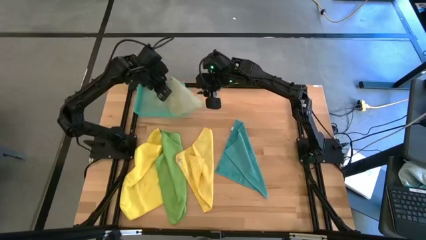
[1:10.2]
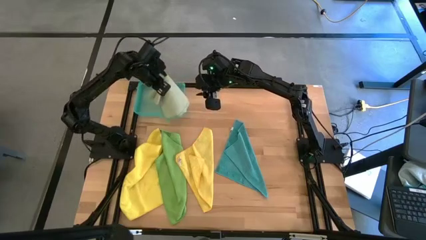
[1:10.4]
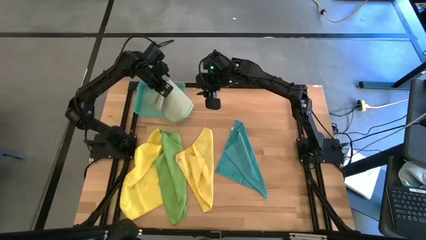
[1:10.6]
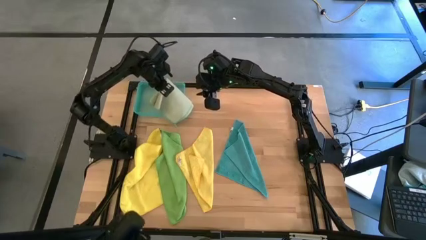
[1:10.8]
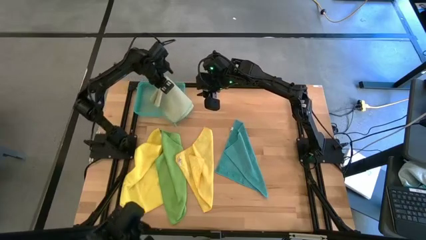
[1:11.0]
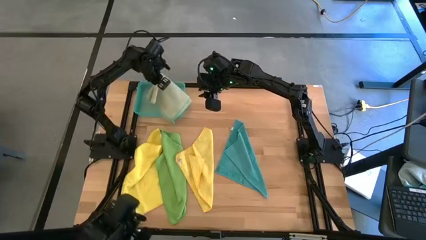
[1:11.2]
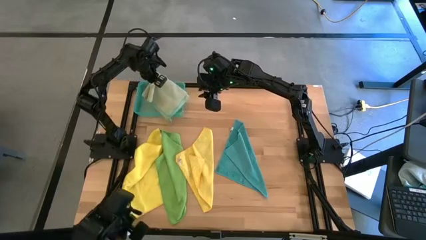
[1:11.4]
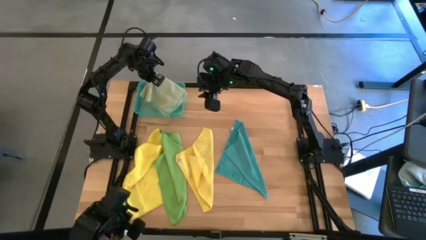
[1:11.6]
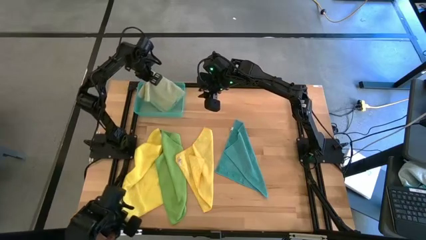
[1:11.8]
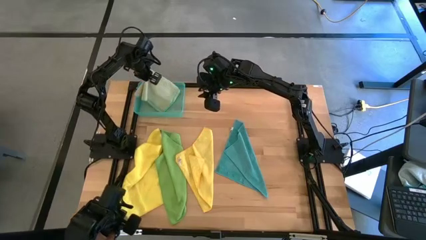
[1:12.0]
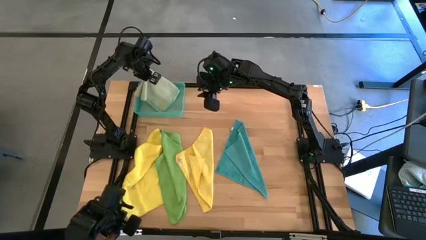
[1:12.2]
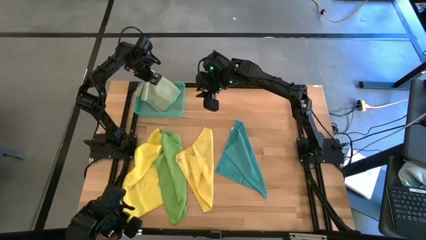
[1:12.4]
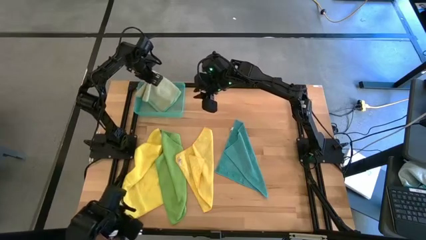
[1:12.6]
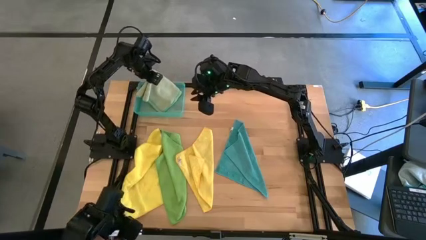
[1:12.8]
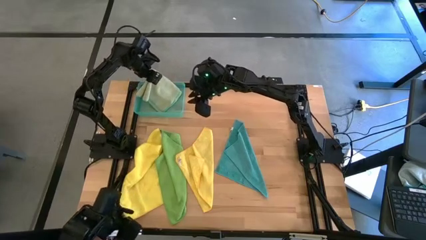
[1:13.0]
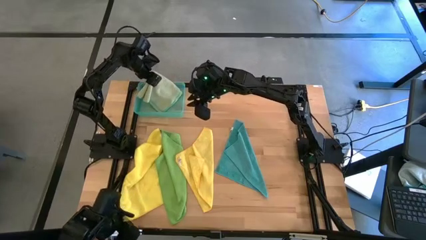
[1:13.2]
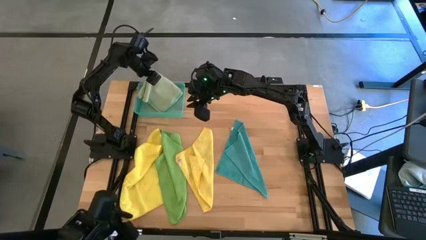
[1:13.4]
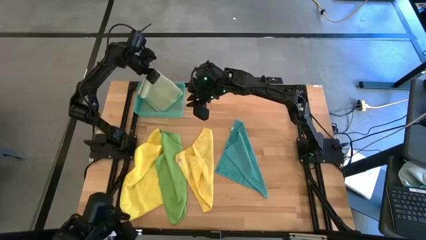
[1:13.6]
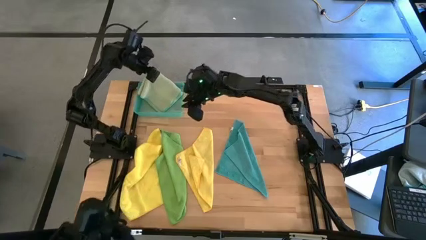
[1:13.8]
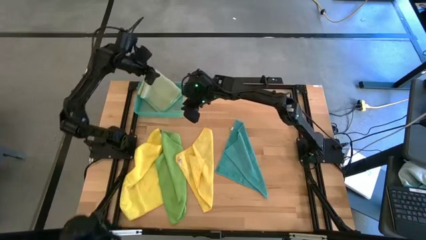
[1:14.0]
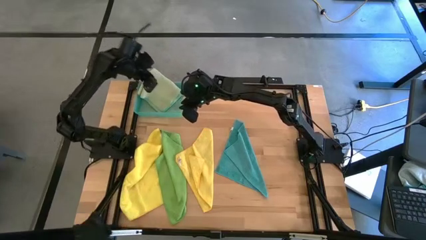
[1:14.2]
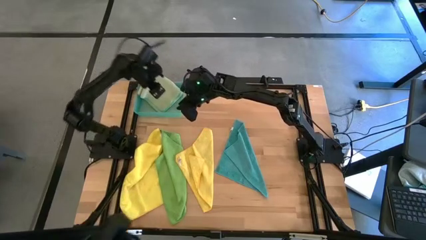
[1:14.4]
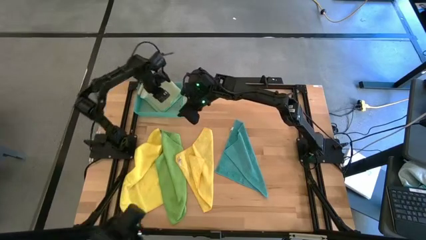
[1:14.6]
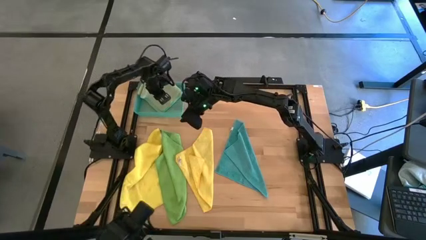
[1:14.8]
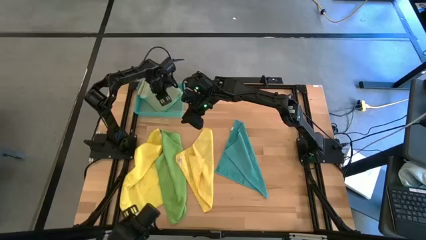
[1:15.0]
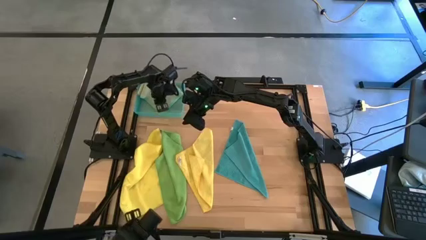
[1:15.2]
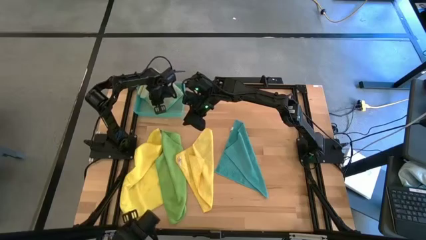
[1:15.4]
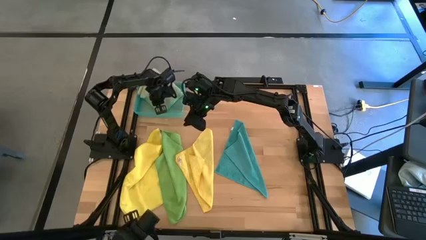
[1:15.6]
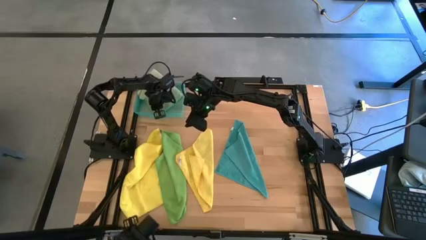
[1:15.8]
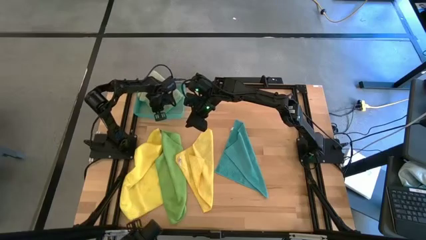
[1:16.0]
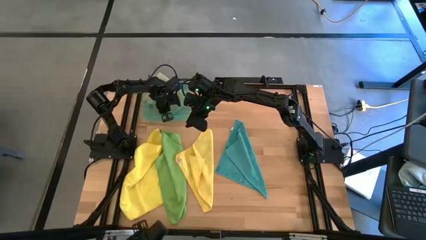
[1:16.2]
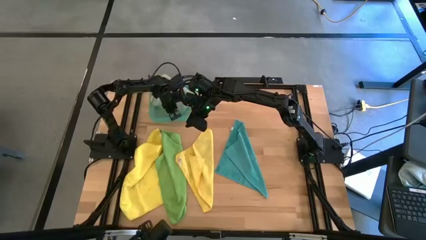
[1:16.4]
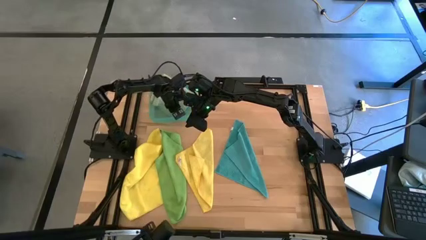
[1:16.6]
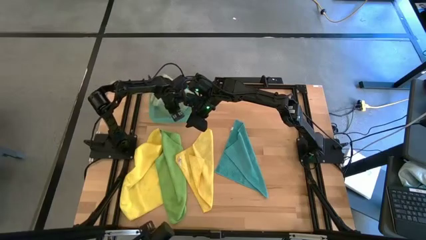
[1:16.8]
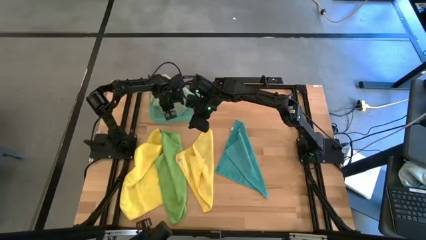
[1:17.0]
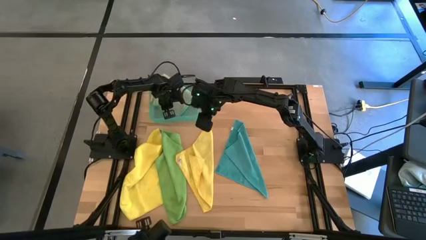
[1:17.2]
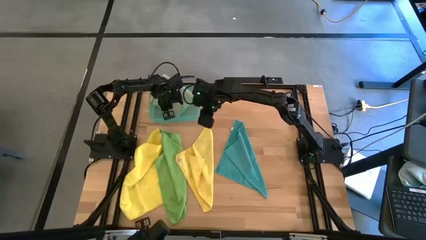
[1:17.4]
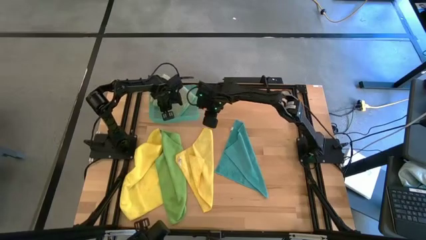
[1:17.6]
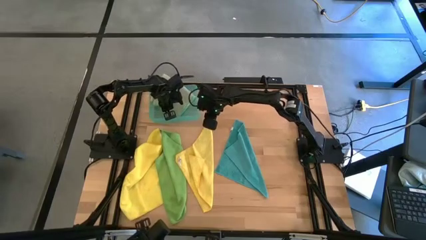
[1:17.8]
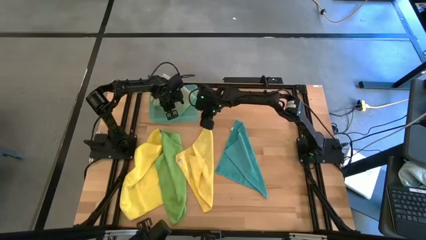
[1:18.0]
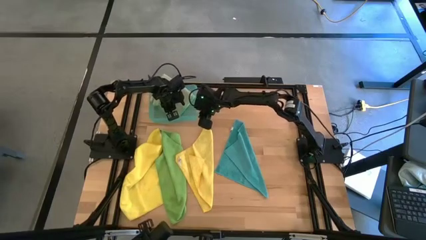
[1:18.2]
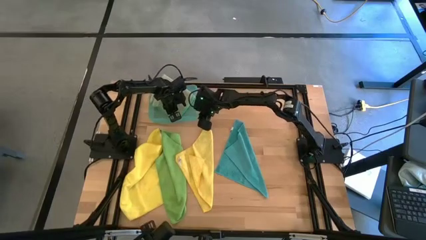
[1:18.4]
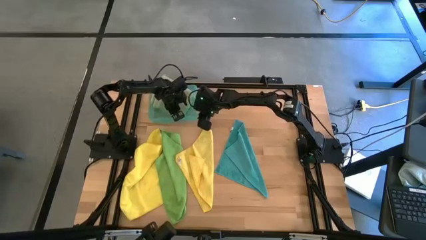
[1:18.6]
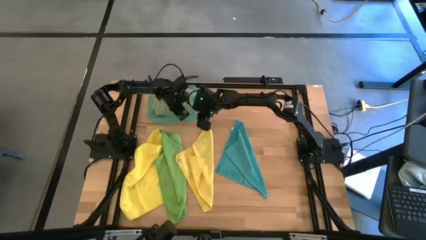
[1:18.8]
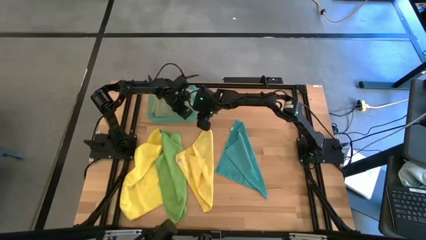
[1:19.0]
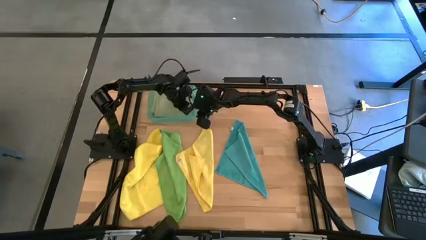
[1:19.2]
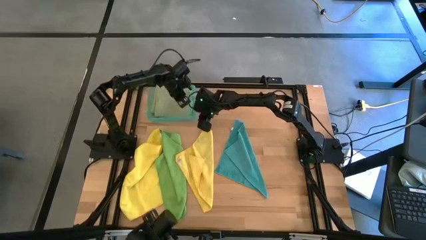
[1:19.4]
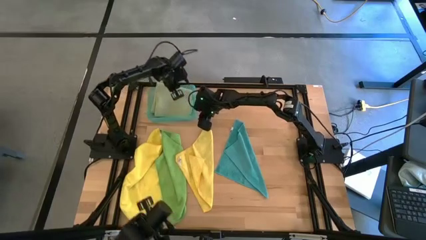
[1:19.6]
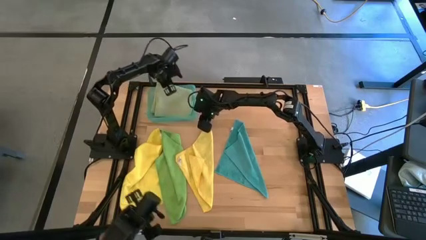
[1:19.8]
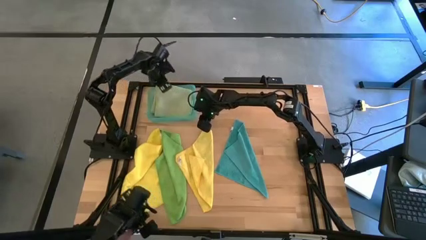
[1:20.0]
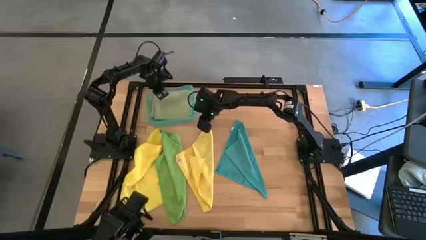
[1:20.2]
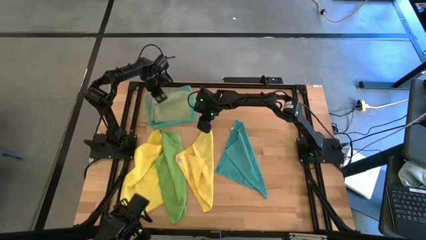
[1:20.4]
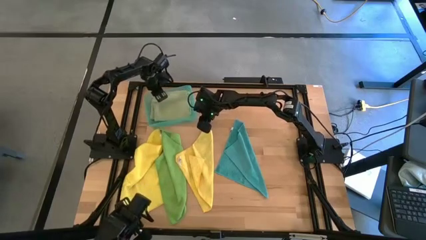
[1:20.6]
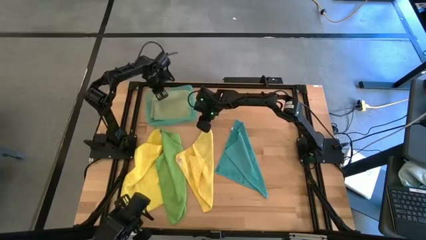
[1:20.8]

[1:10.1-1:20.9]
Task: Fold microfiber towels
Put the light green microfiber cloth into the blue bin

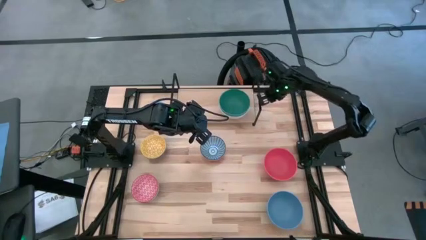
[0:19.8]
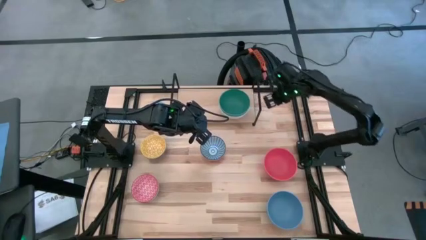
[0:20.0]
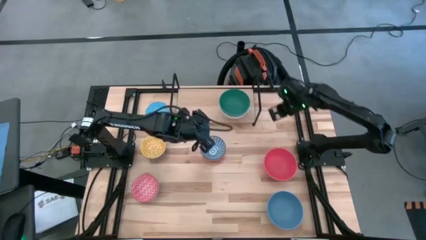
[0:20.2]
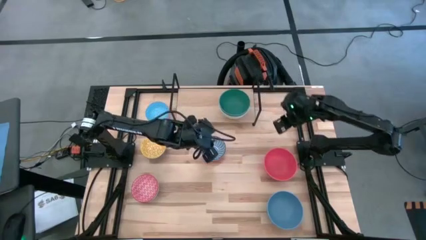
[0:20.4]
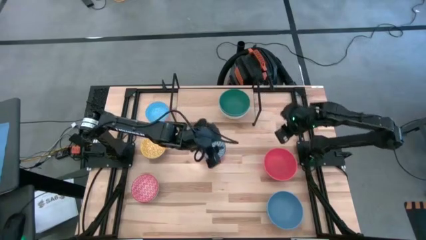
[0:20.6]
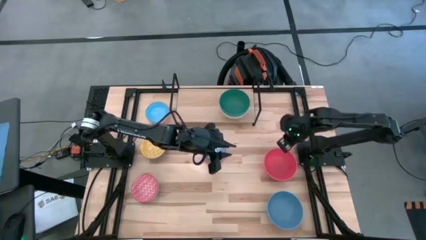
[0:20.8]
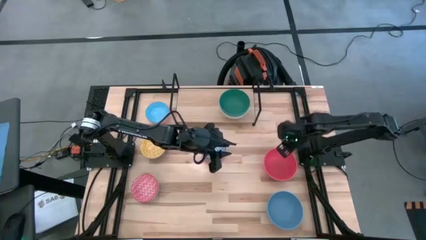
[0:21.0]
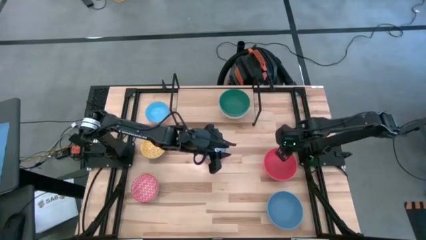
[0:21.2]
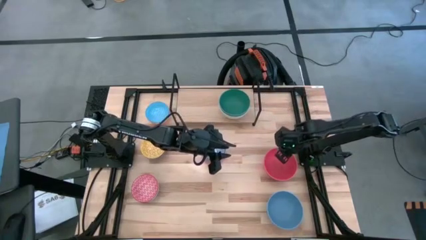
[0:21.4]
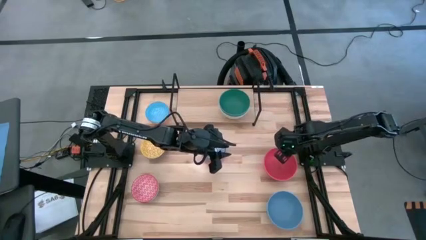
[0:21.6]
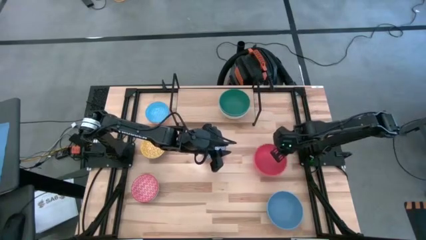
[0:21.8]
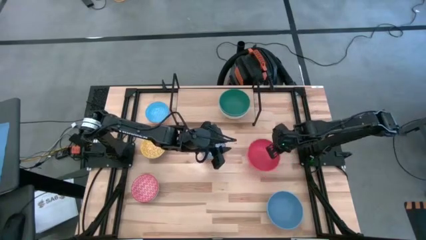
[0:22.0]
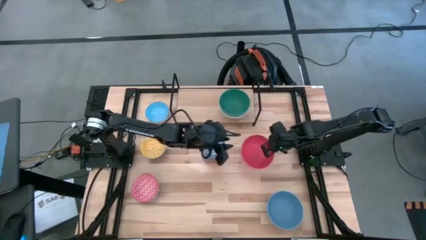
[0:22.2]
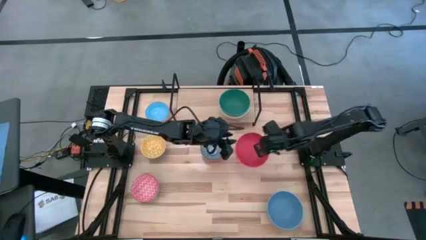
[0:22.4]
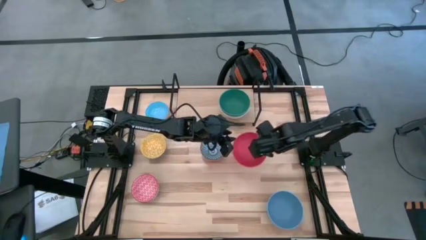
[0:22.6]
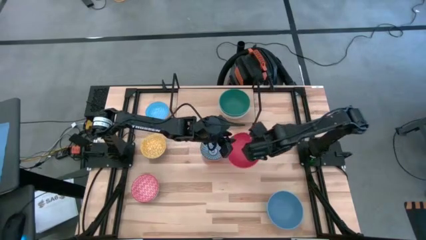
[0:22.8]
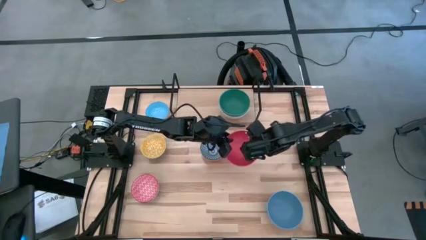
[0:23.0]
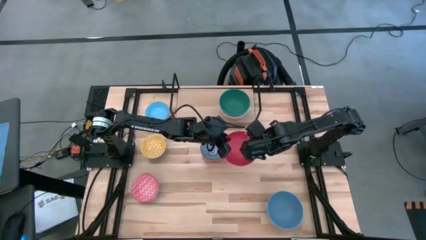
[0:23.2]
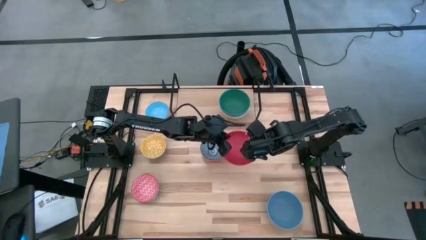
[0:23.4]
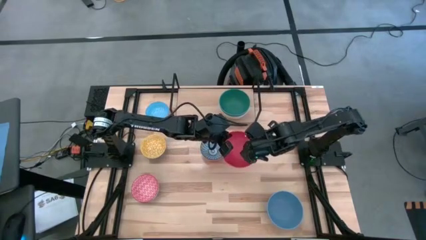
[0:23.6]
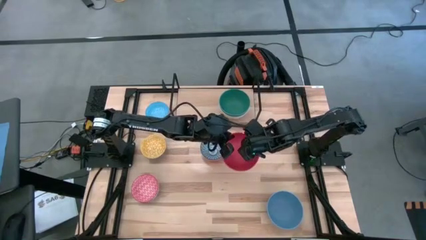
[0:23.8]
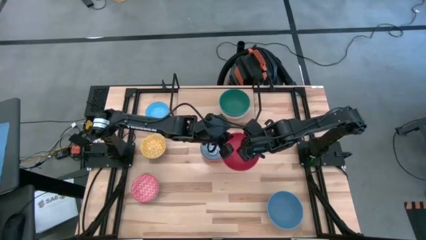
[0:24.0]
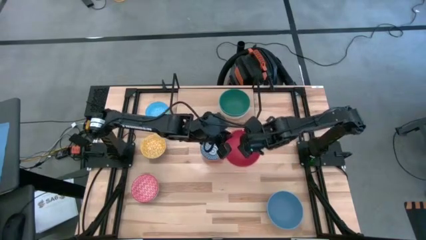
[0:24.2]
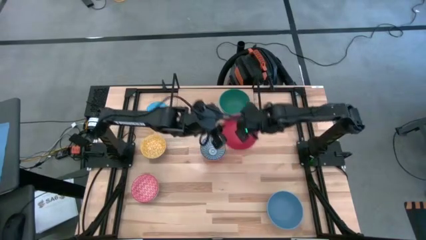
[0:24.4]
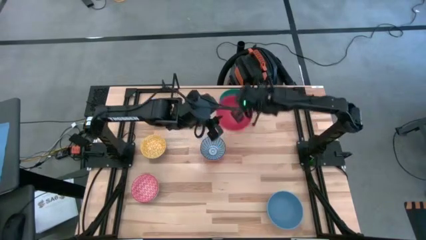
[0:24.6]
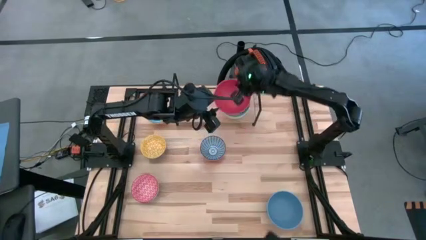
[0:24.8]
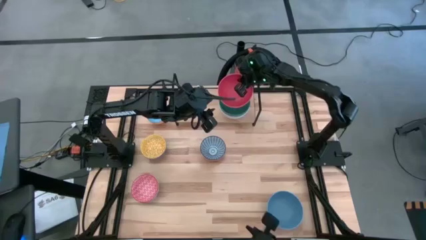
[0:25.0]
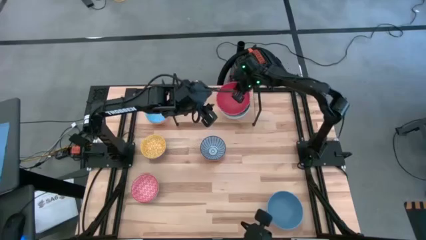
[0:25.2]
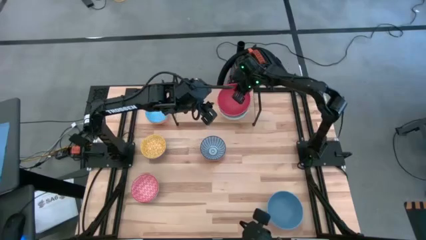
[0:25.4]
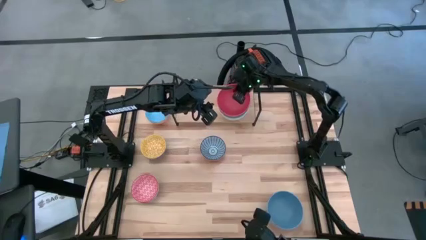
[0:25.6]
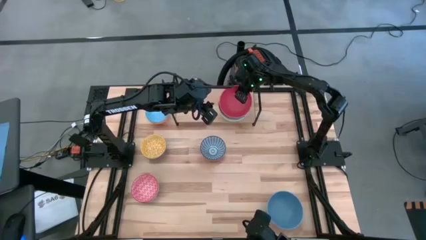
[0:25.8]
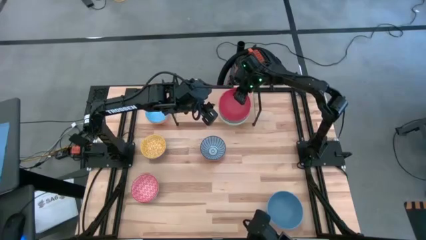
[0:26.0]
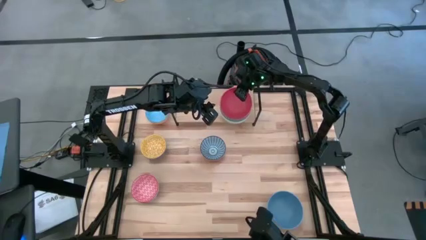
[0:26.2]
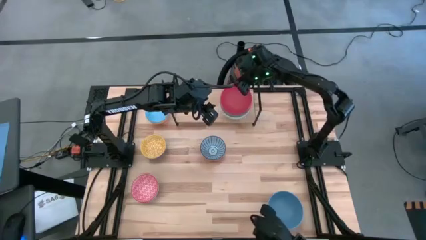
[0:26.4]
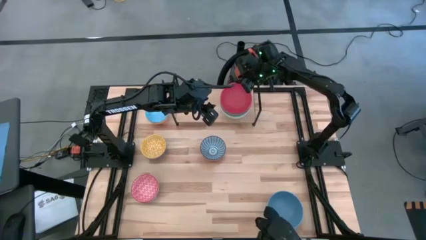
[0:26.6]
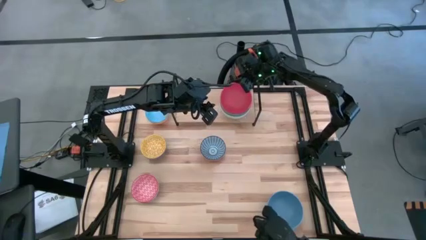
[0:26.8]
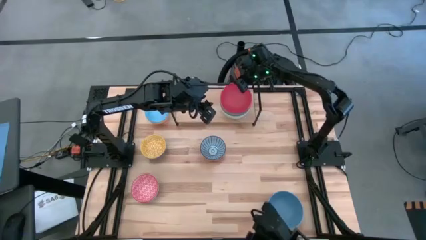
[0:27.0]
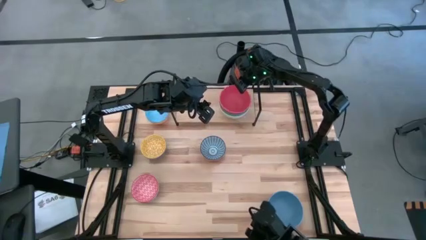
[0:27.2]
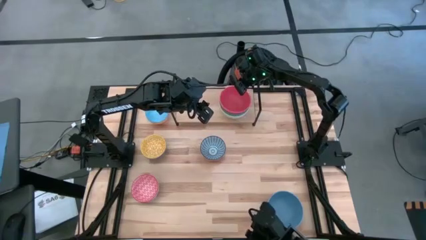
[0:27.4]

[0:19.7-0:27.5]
Task: Place and stack bowls onto a shelf
Stack the big red bowl on the big green bowl on the shelf
